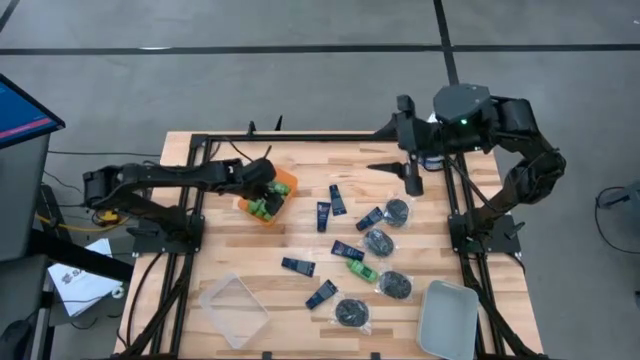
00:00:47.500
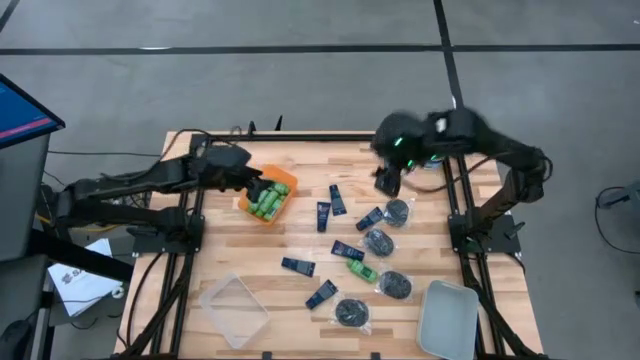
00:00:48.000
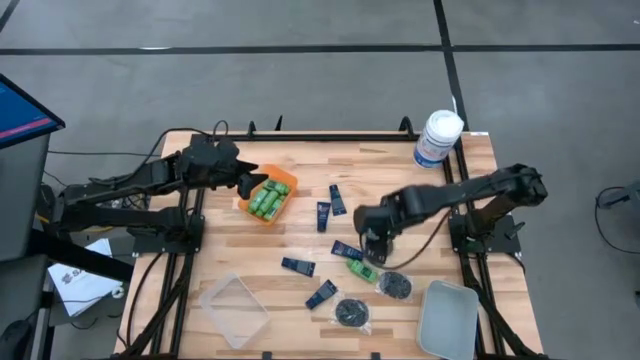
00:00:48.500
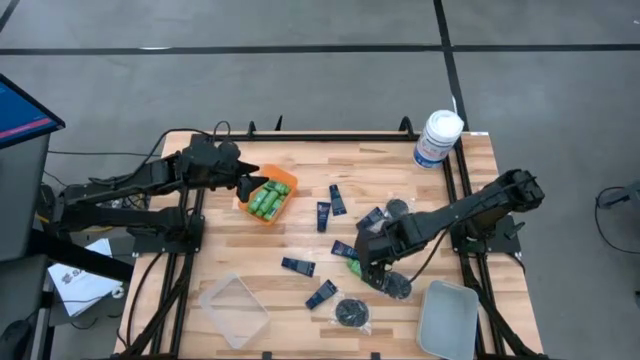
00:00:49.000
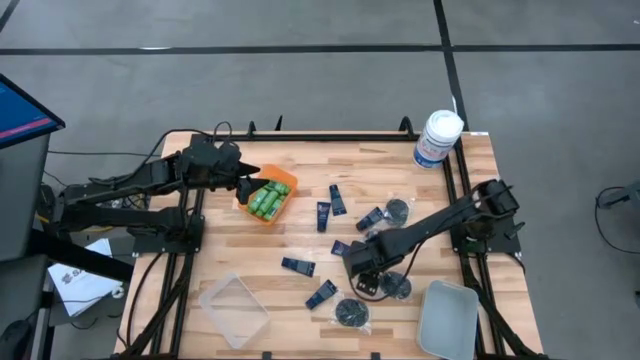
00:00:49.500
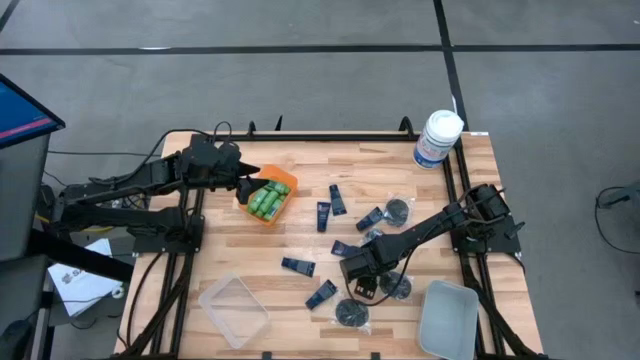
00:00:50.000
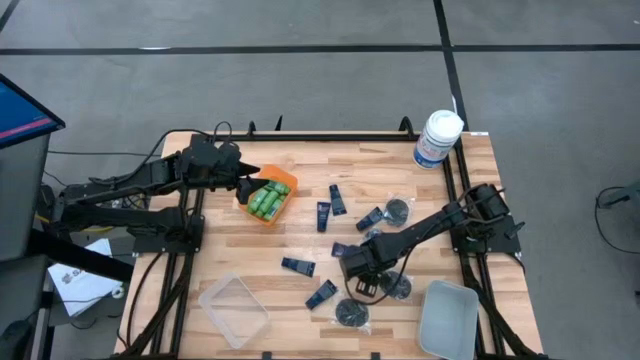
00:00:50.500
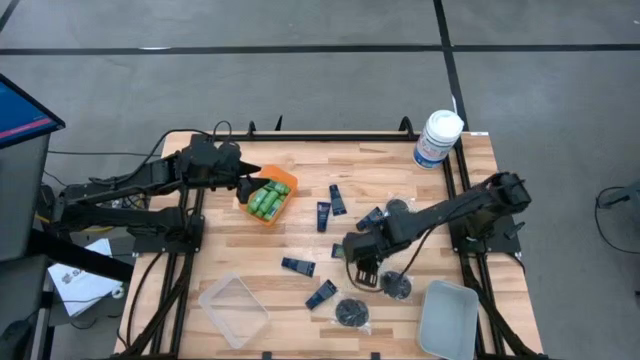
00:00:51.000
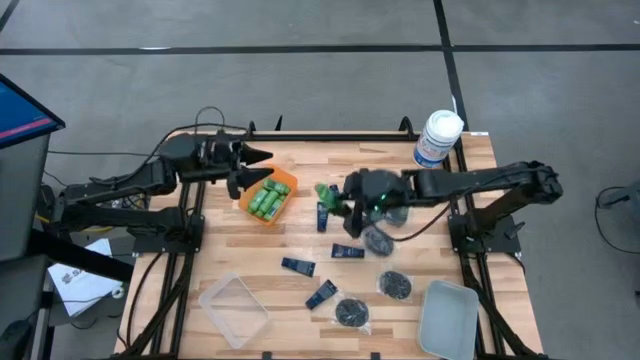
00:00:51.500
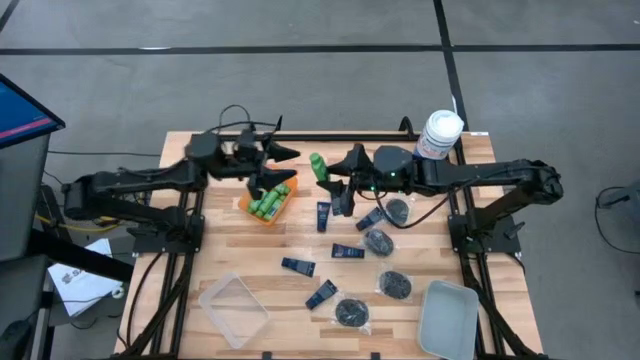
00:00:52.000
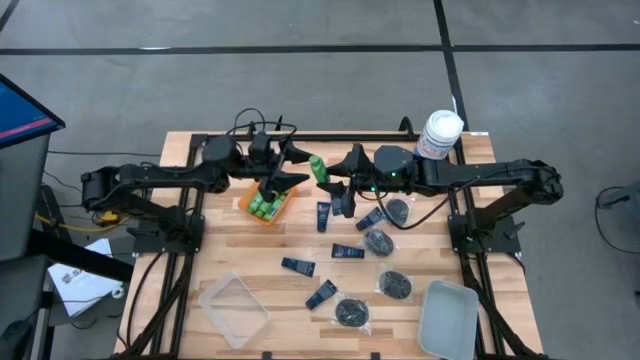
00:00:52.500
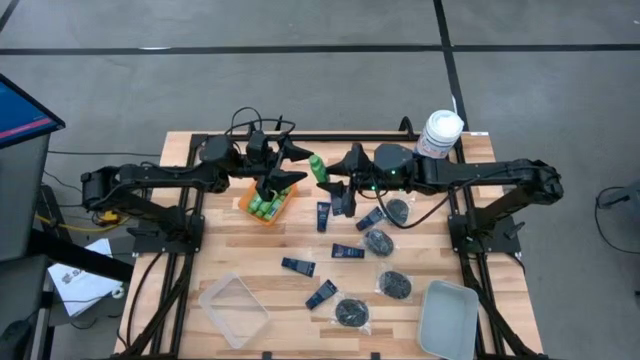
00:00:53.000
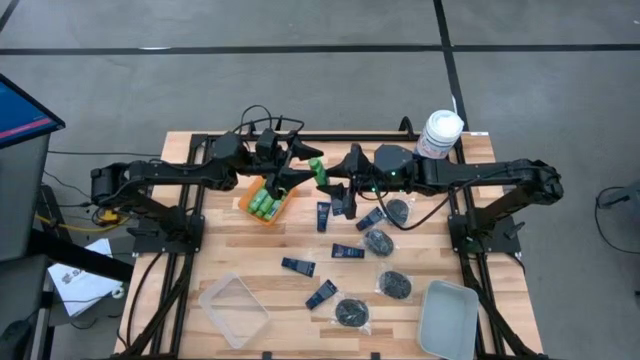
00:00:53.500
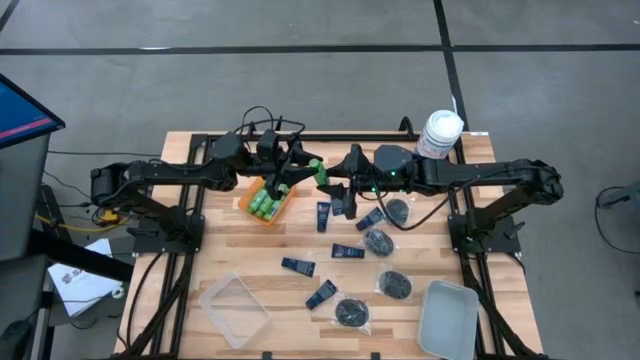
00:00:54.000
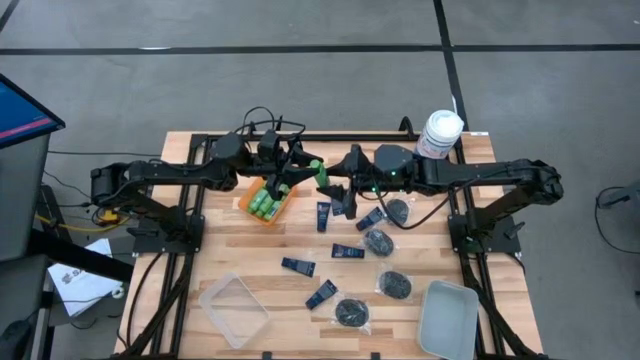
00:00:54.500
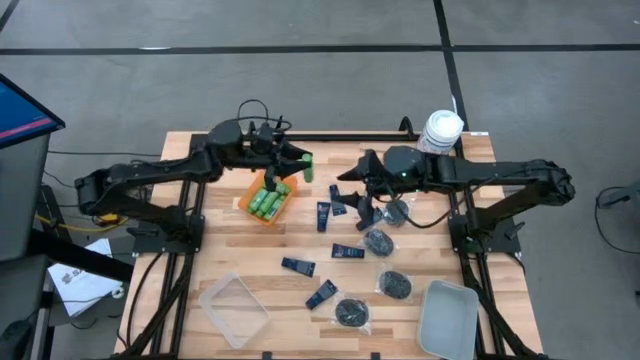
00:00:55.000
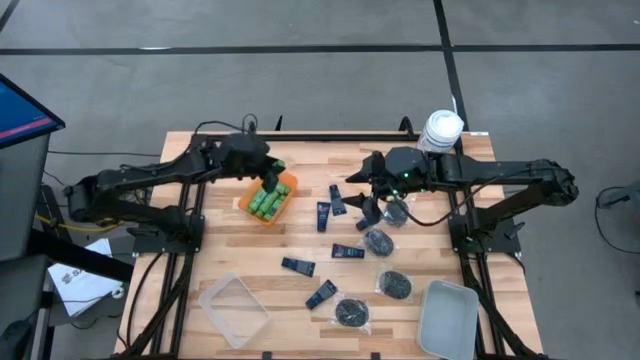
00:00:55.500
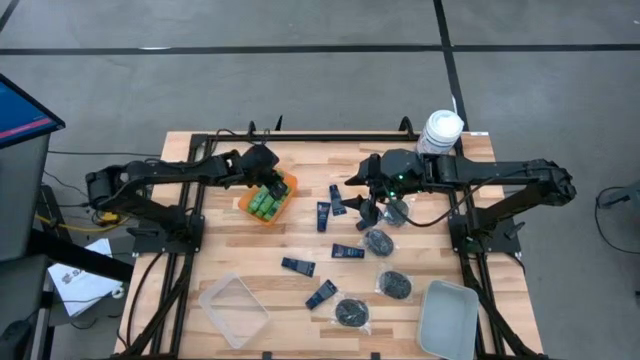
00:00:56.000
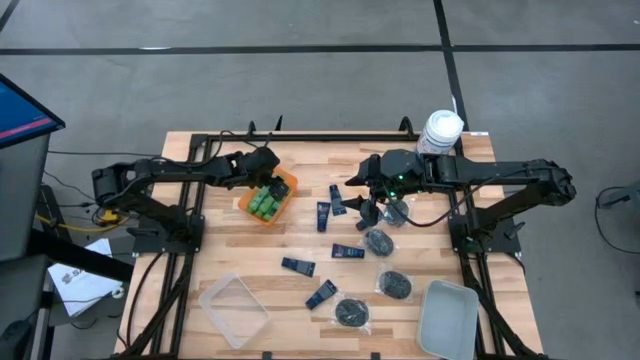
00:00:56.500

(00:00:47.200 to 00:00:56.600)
Task: Pick & Place Travel size toiletries
Put the green shampoo bottle into the top orange bin

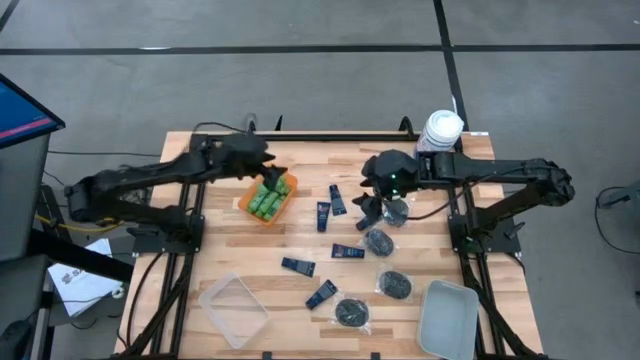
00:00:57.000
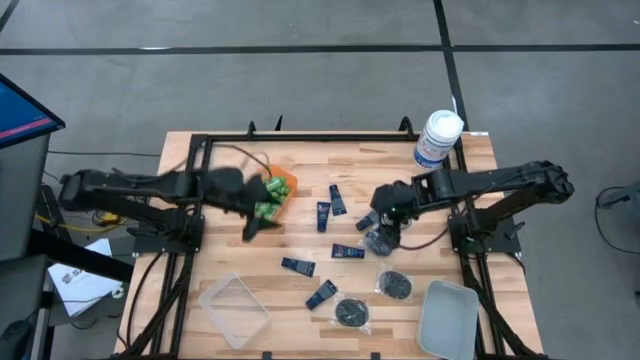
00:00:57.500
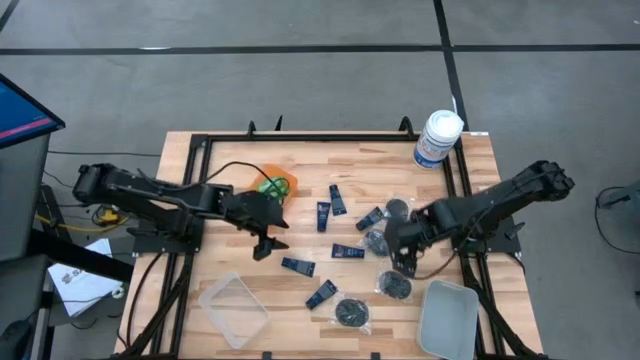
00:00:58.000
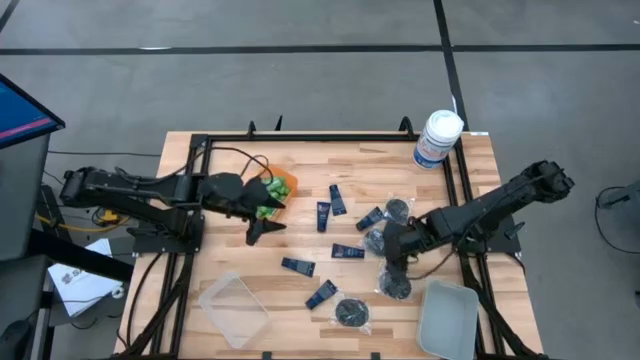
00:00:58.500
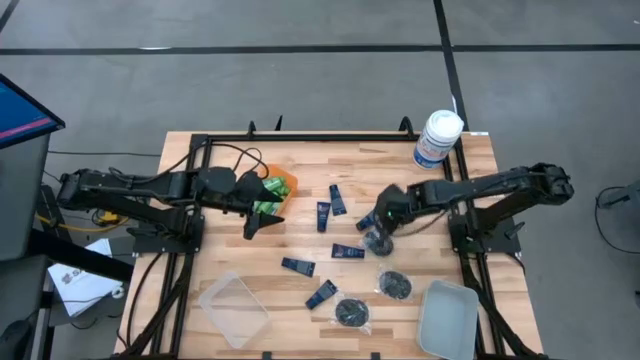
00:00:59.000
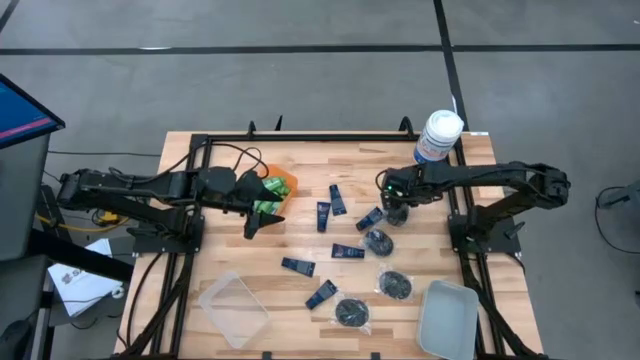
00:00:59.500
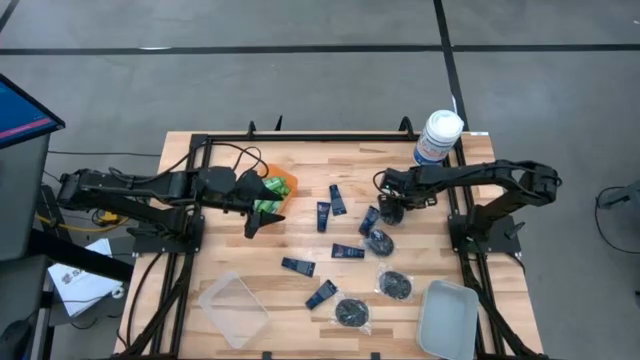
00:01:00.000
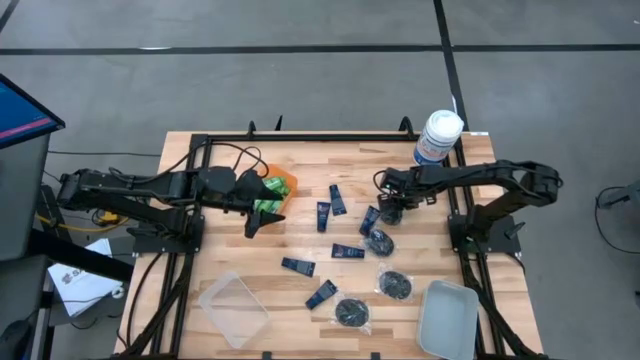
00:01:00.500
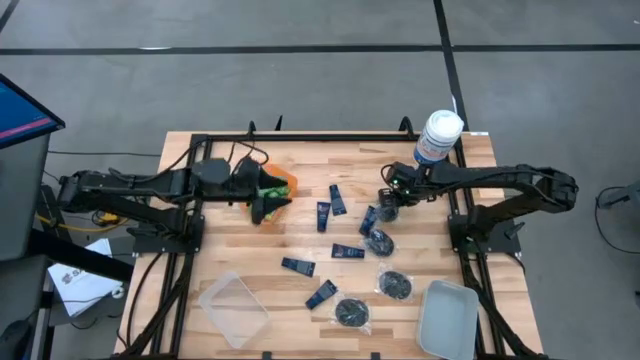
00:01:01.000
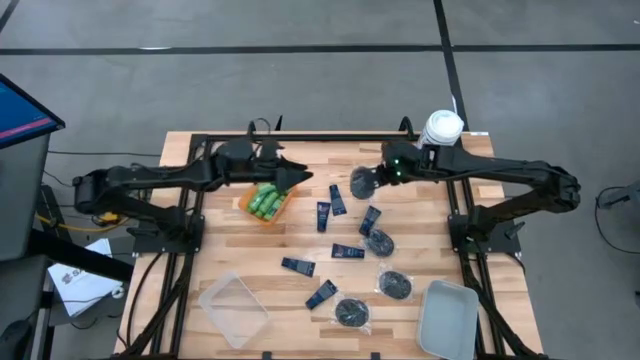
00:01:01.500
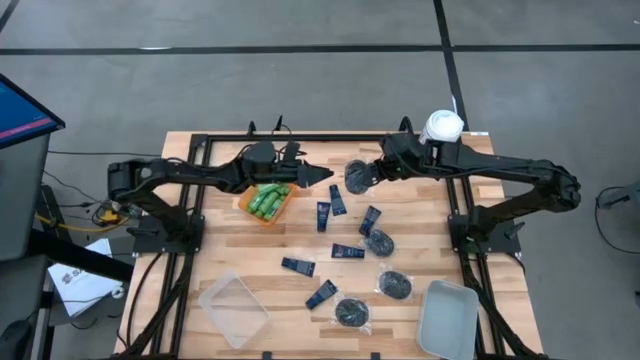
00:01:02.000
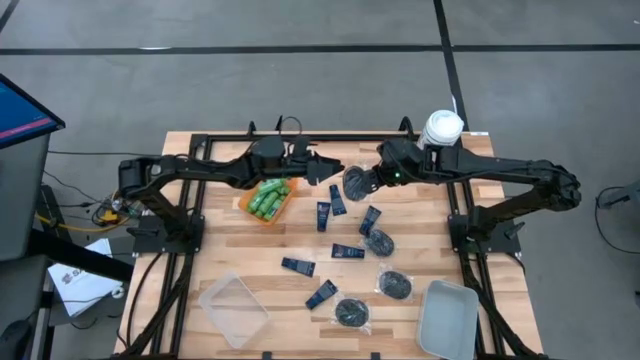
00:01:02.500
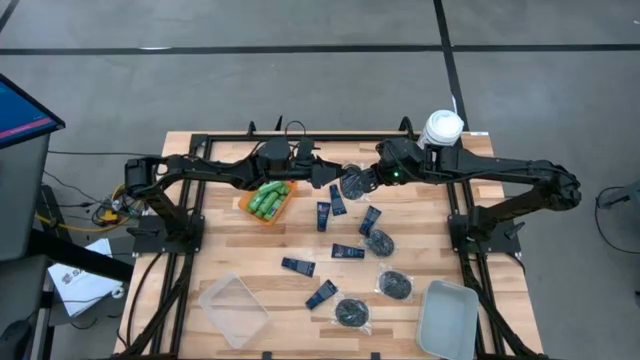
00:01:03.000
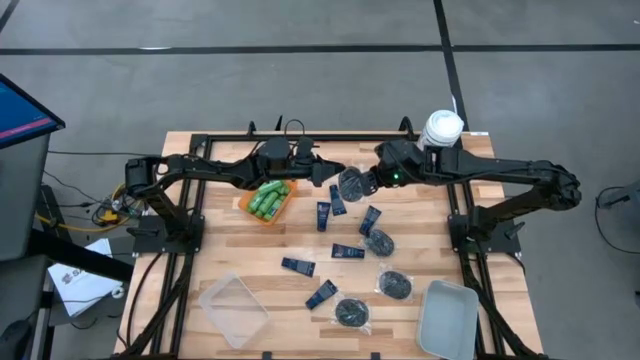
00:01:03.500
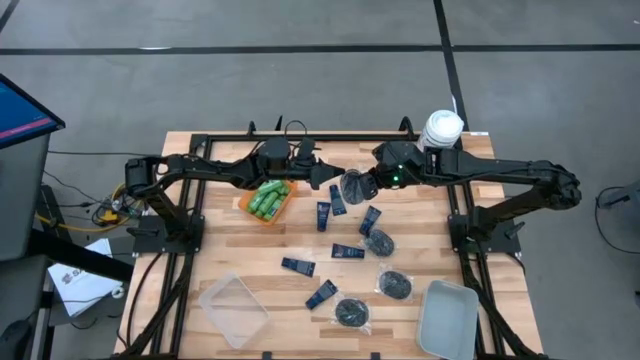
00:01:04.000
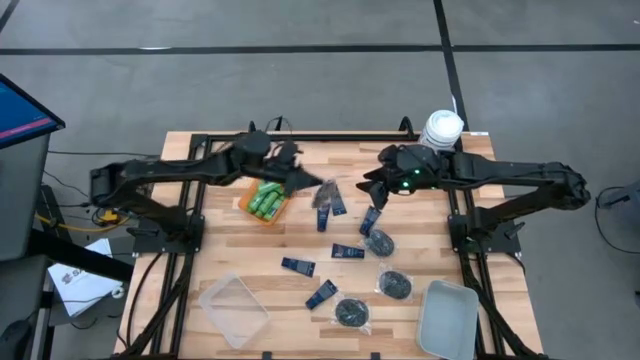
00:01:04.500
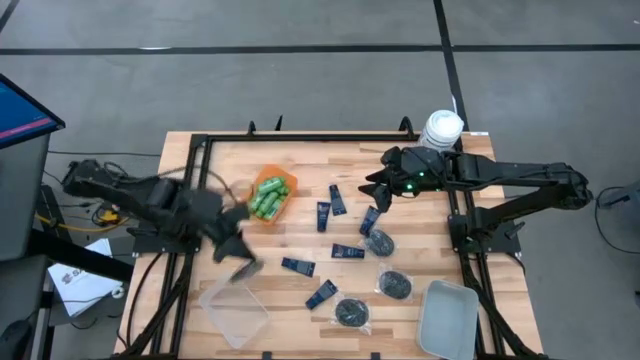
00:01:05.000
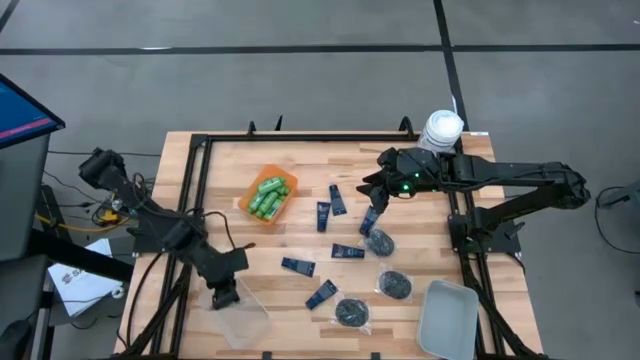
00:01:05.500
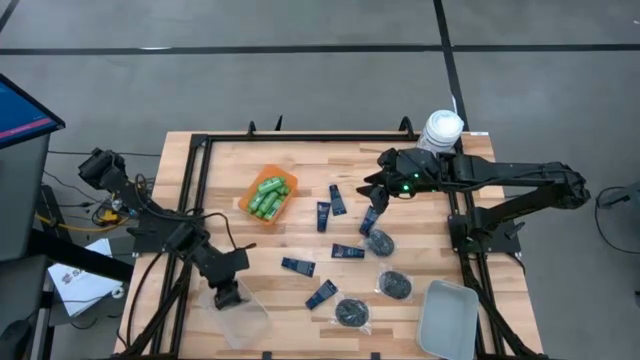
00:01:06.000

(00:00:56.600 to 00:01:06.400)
Put the black hairbrush into the transparent bin
